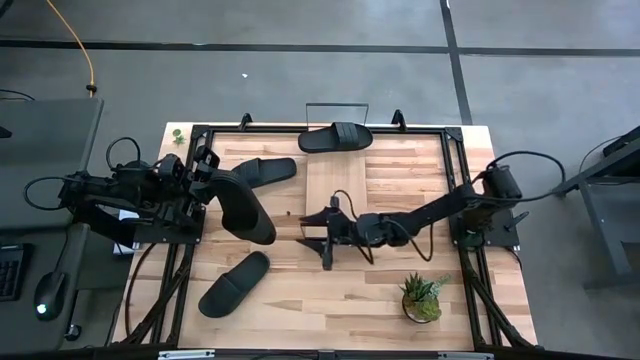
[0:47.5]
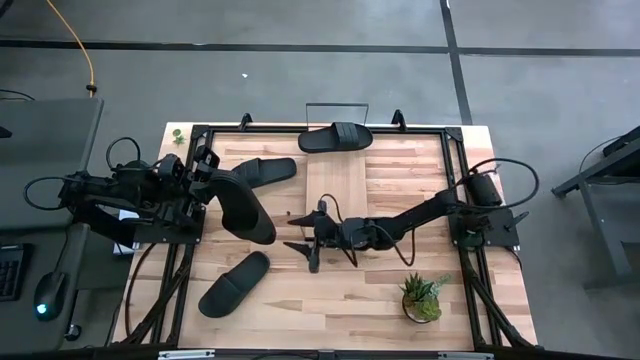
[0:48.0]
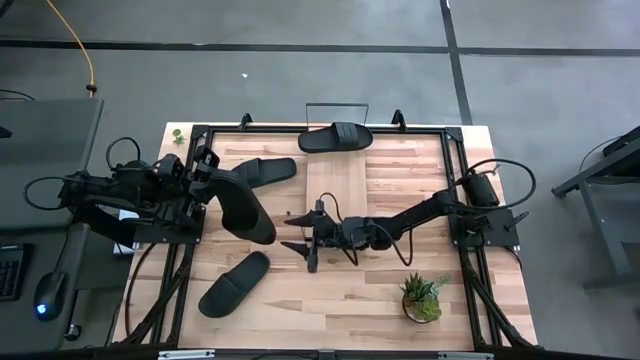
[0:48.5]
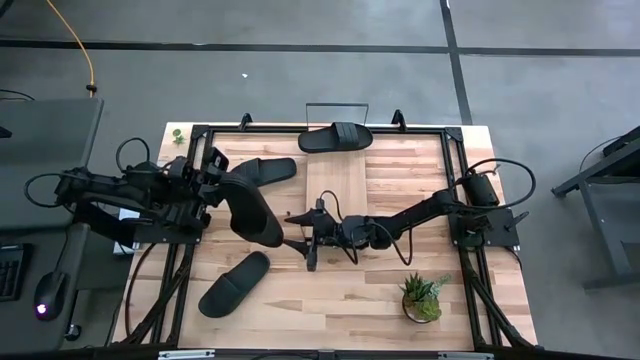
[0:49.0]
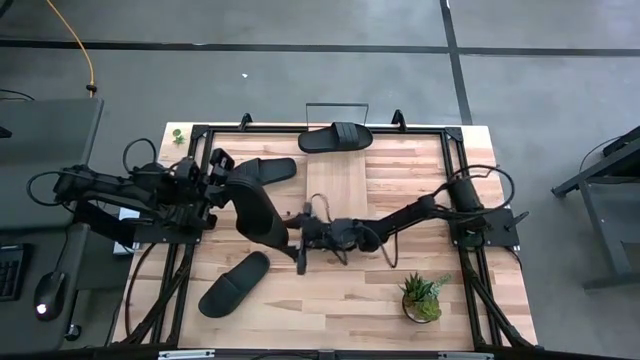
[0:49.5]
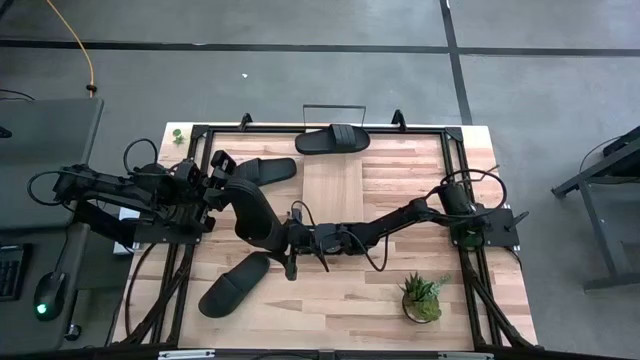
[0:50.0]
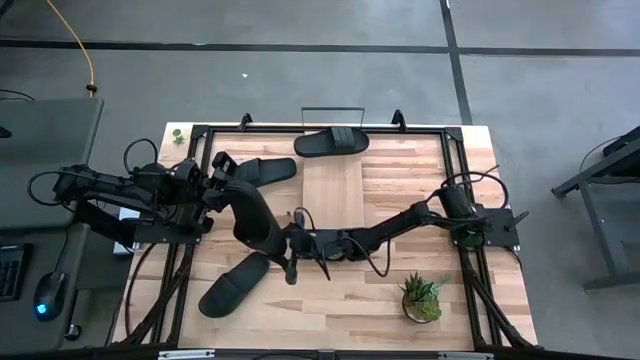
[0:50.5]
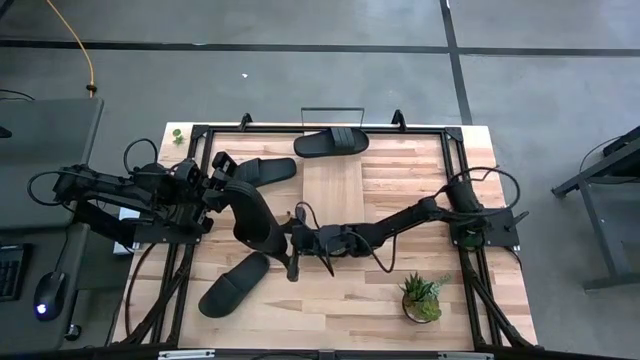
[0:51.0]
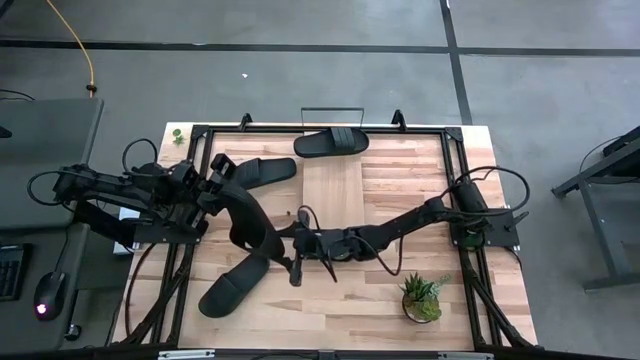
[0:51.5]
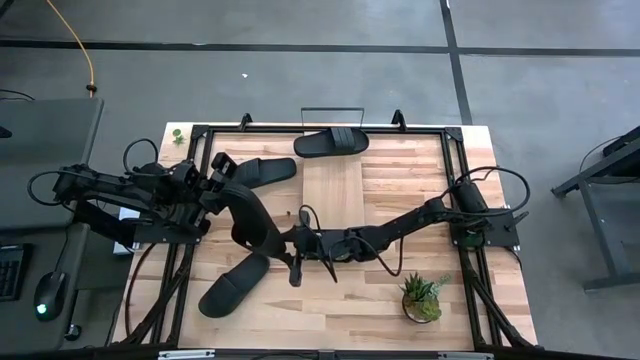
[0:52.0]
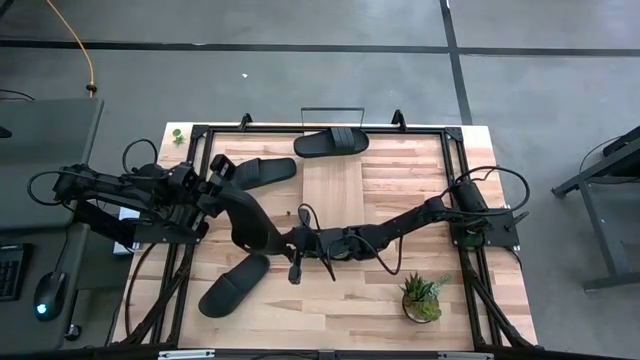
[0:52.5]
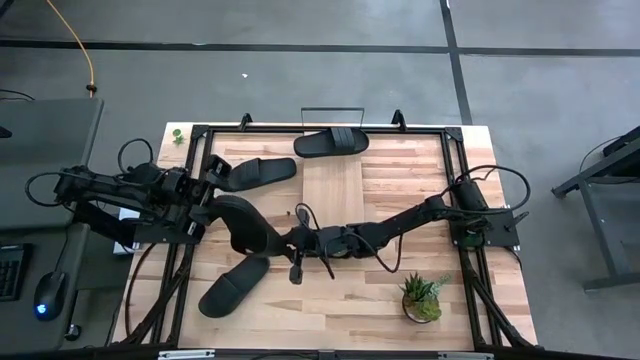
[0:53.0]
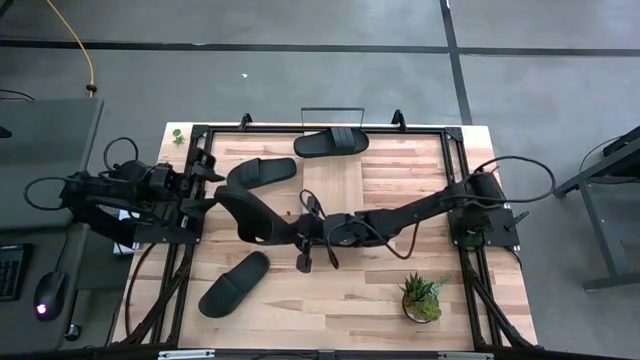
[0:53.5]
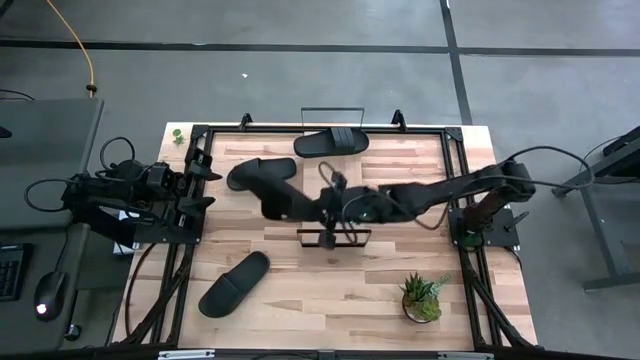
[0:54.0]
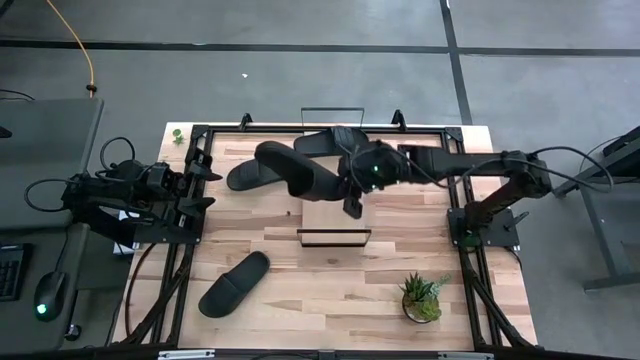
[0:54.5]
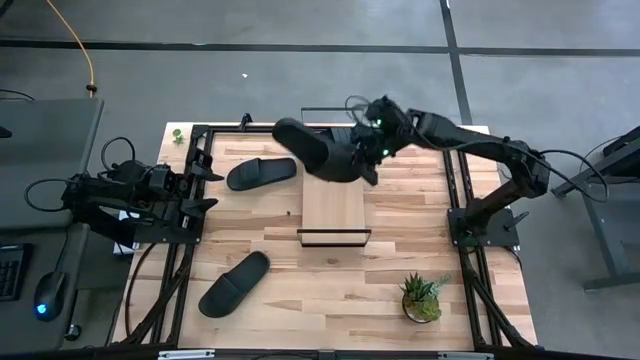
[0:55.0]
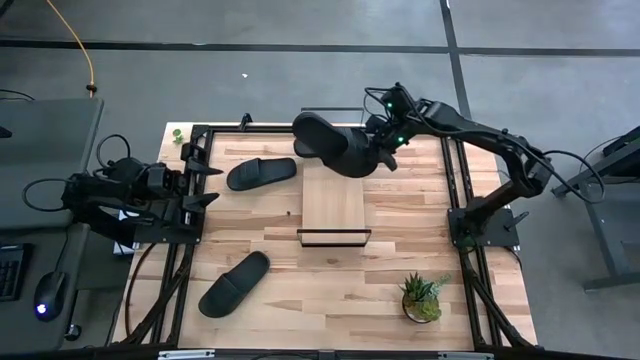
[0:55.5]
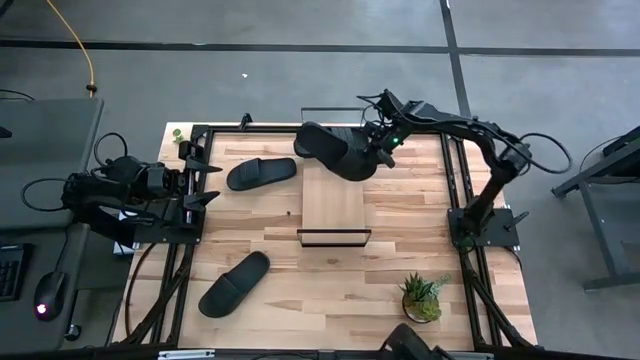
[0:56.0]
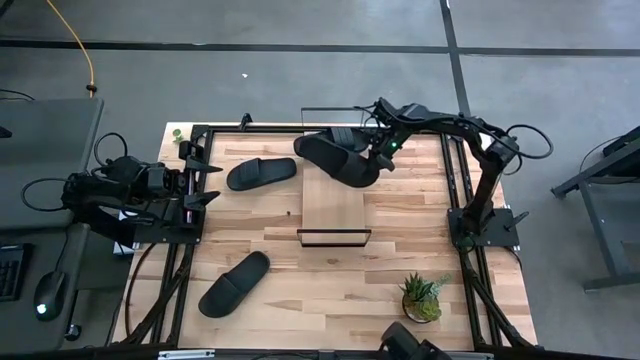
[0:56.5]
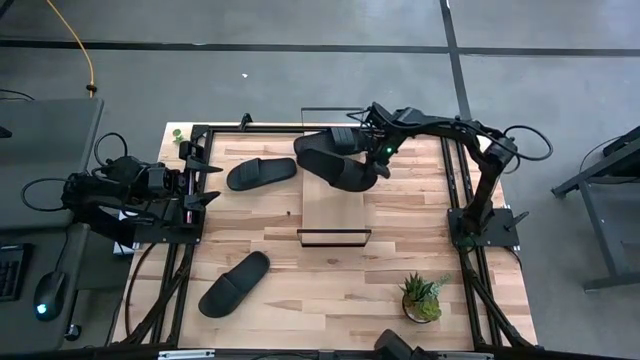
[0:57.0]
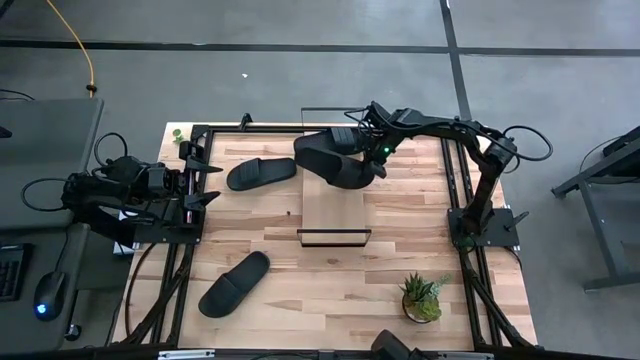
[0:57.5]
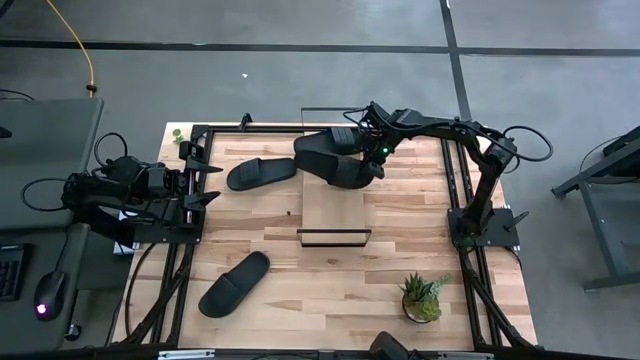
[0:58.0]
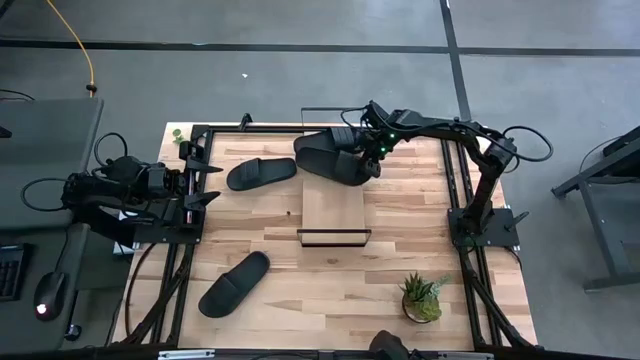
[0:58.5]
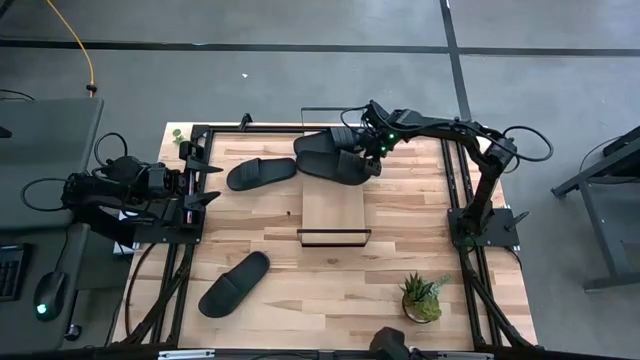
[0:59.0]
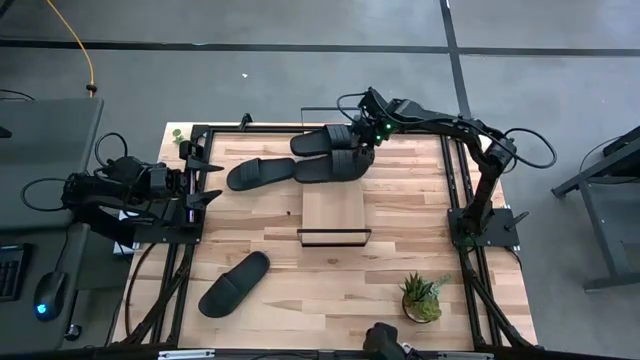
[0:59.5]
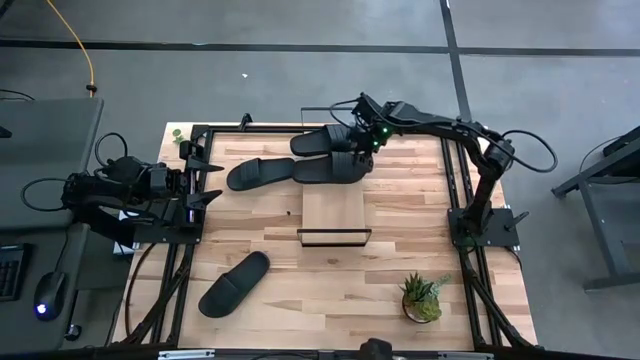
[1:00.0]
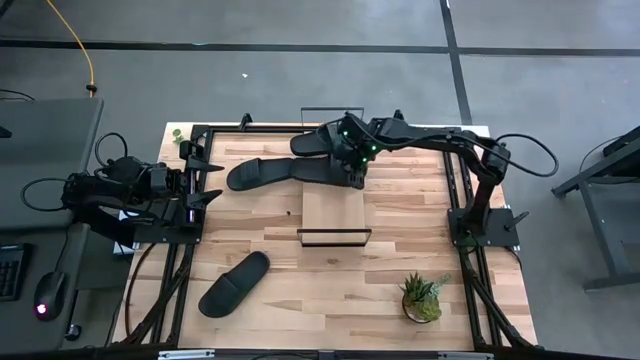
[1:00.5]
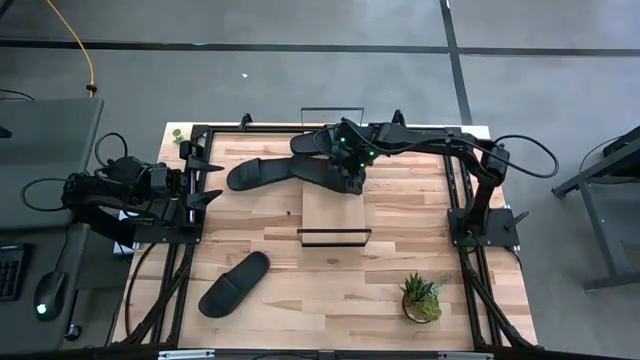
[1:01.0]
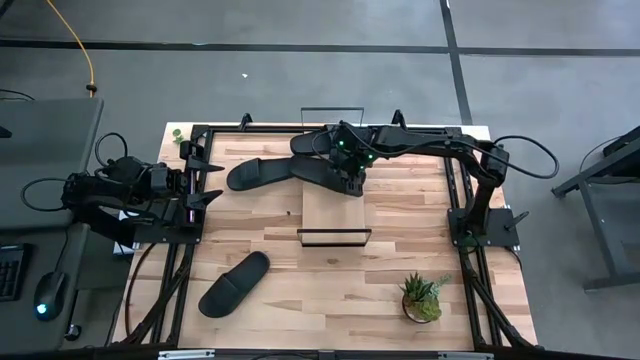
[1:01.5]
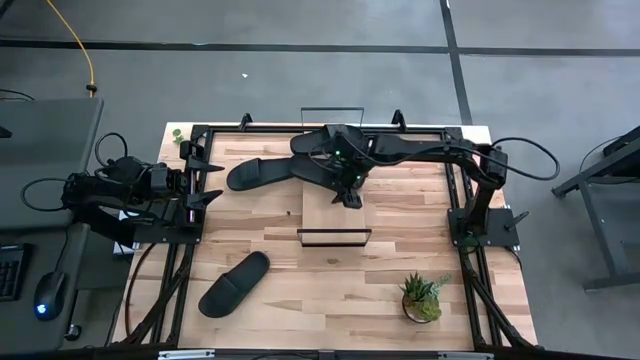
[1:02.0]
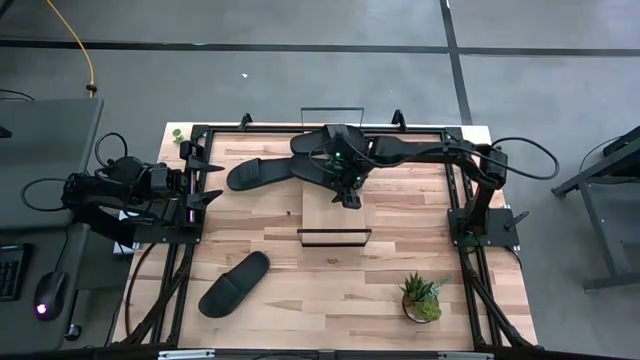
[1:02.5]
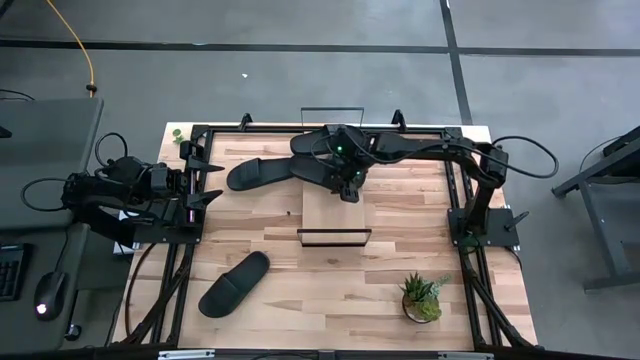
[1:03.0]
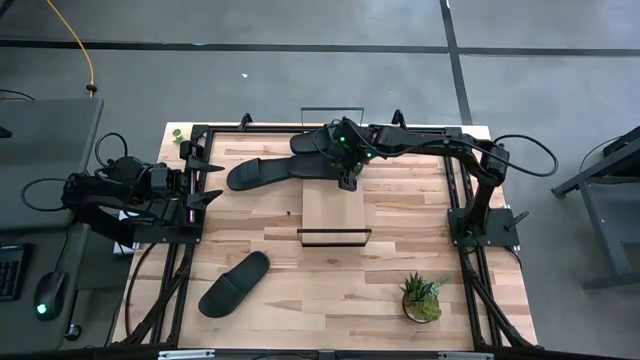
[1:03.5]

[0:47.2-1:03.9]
Task: Pick and place slides into the shelf
Put the black slide on the shelf

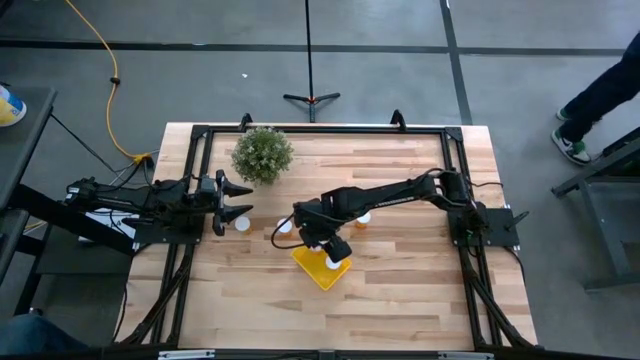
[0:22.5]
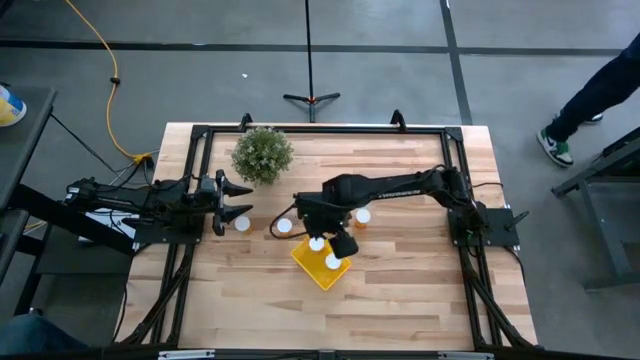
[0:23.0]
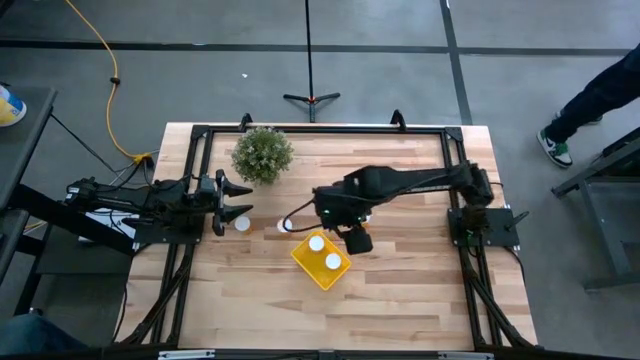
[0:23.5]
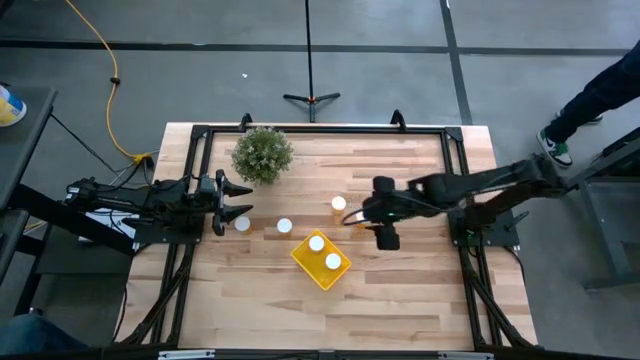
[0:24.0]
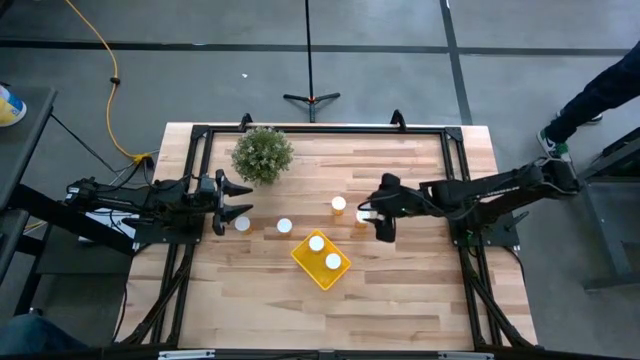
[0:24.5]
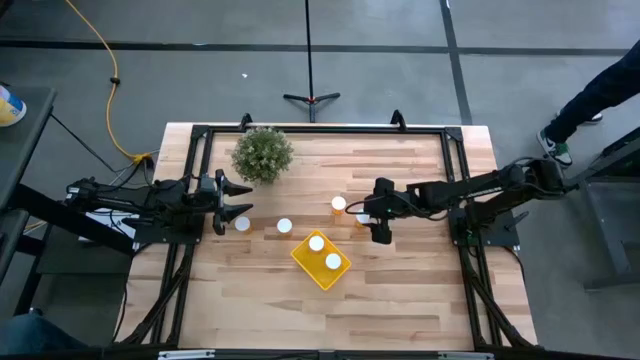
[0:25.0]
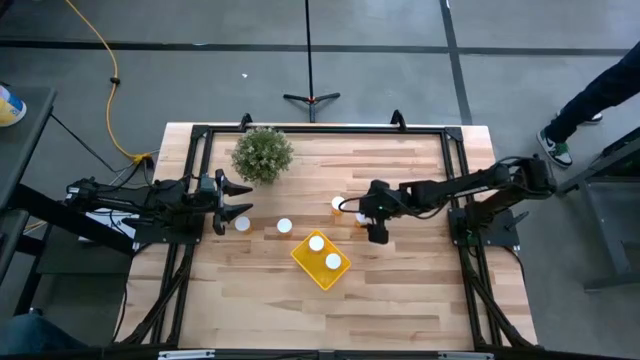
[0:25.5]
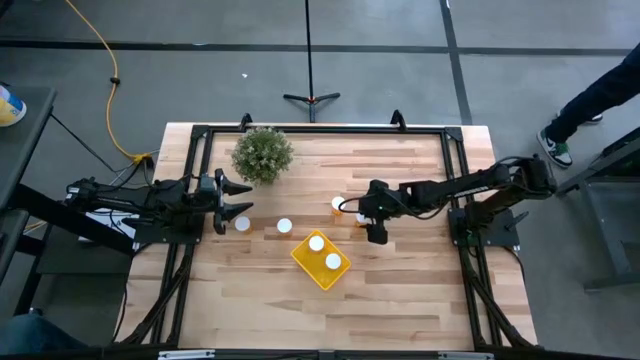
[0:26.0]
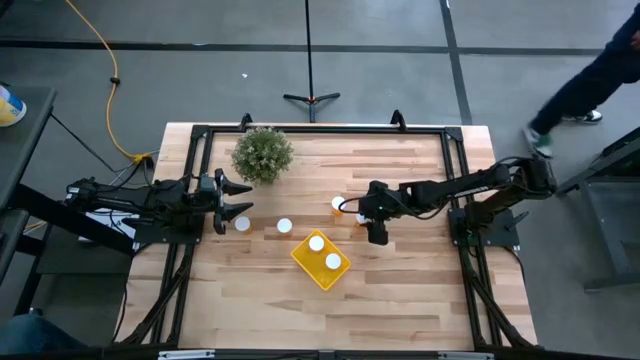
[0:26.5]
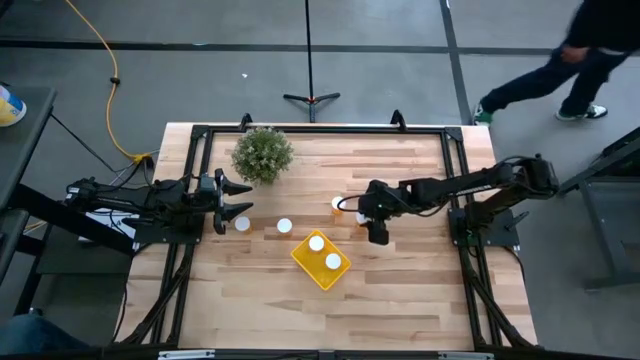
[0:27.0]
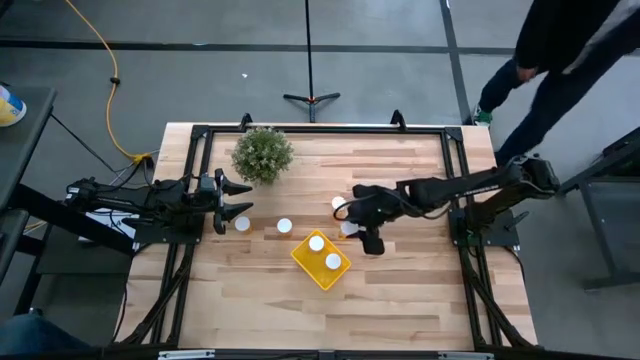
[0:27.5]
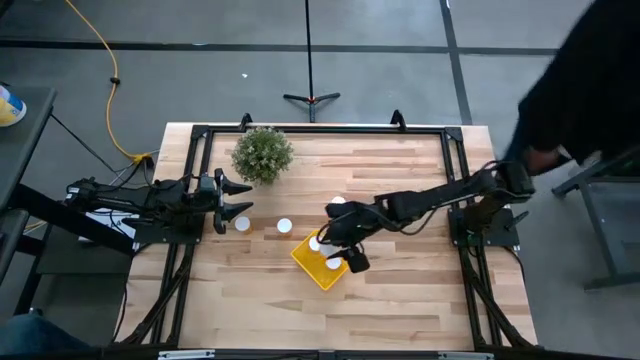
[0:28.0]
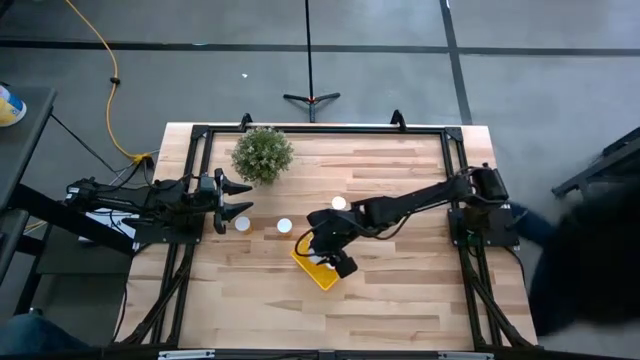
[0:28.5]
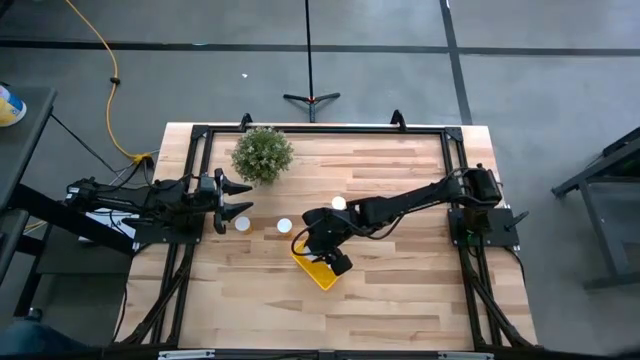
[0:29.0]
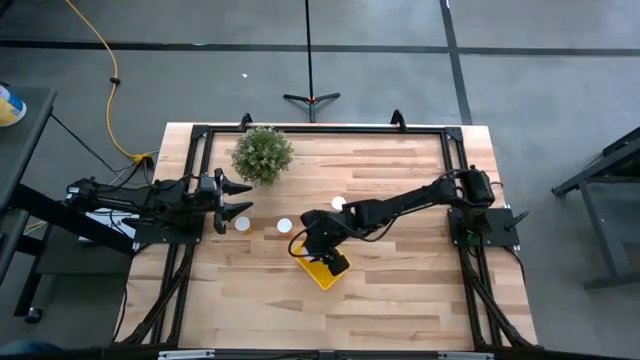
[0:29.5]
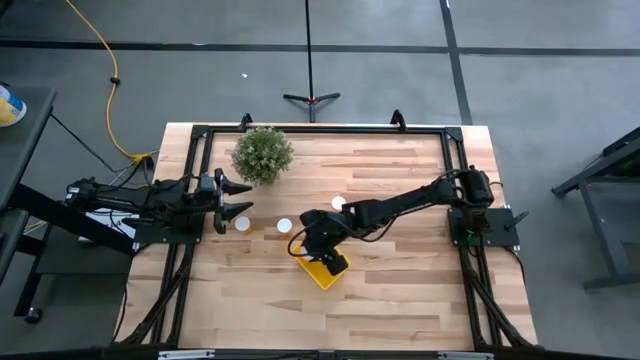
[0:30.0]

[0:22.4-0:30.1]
Task: Pick and place pill bottles into a basket
Put the pill bottle into the yellow transparent bin
